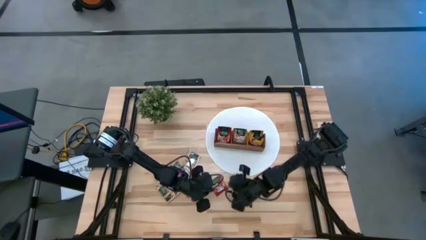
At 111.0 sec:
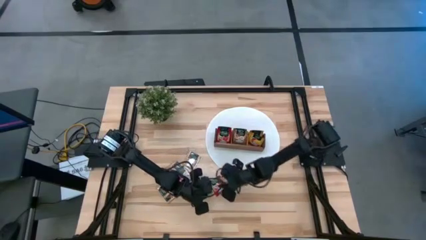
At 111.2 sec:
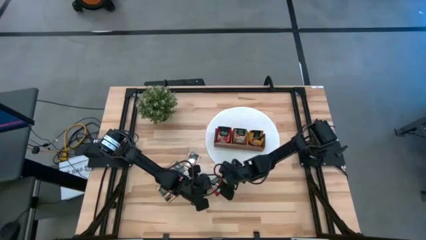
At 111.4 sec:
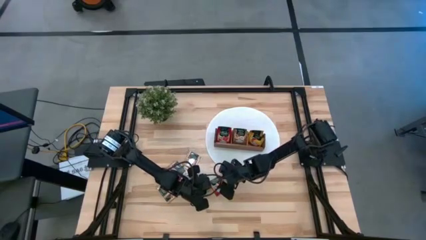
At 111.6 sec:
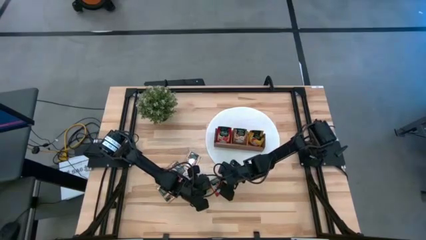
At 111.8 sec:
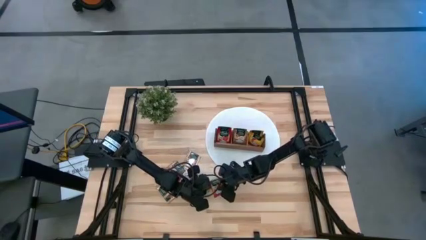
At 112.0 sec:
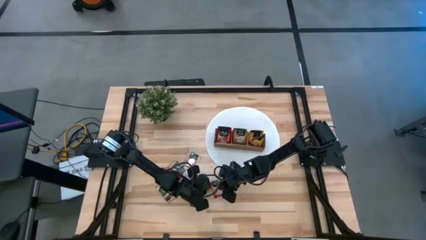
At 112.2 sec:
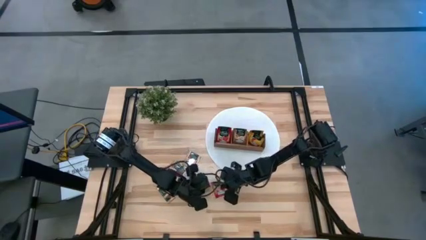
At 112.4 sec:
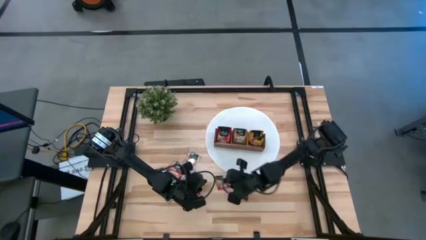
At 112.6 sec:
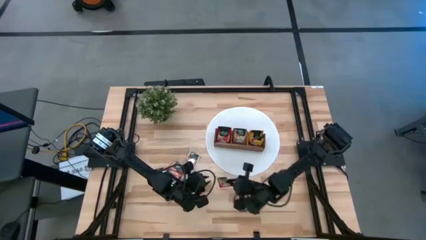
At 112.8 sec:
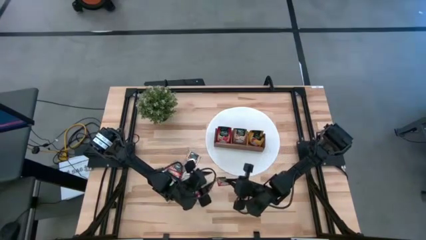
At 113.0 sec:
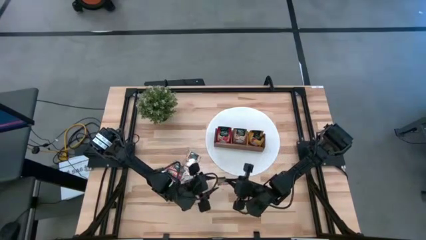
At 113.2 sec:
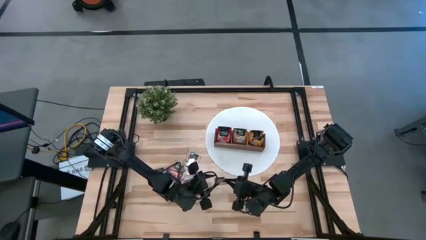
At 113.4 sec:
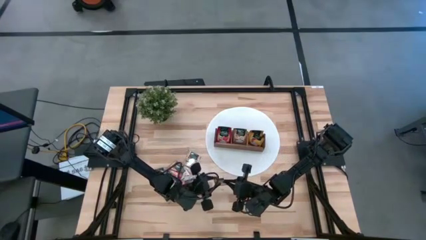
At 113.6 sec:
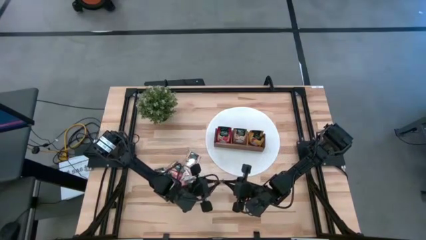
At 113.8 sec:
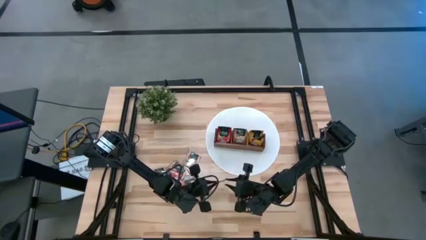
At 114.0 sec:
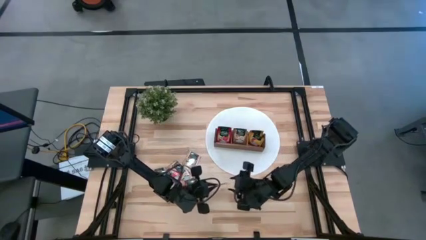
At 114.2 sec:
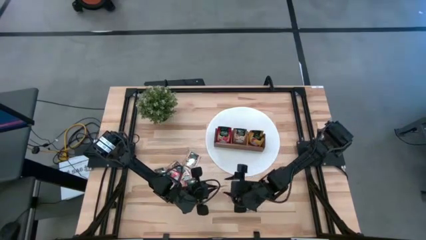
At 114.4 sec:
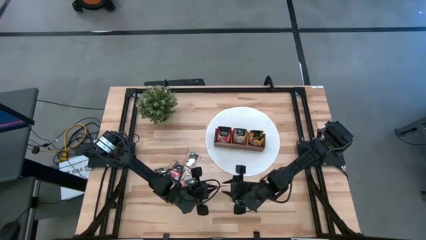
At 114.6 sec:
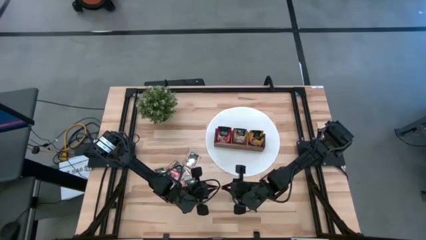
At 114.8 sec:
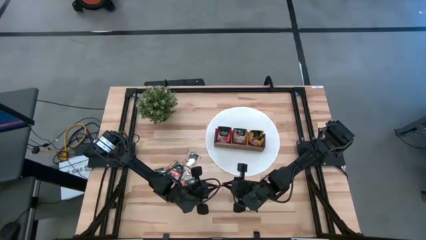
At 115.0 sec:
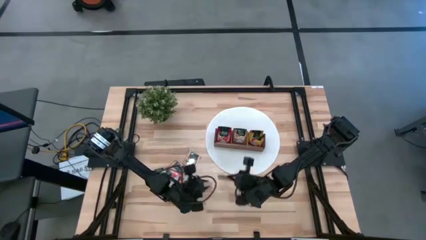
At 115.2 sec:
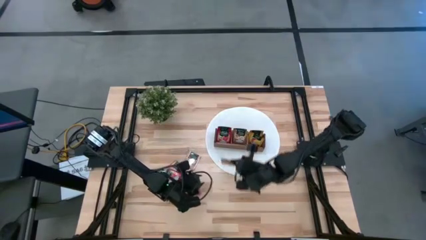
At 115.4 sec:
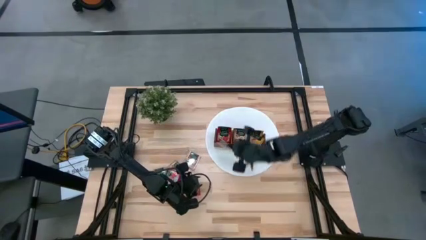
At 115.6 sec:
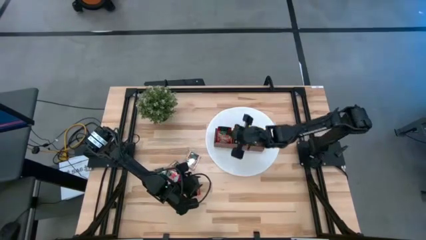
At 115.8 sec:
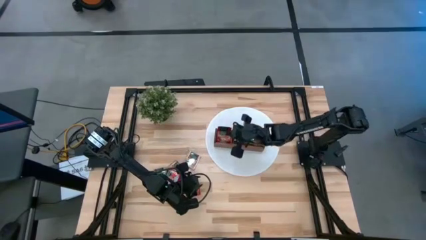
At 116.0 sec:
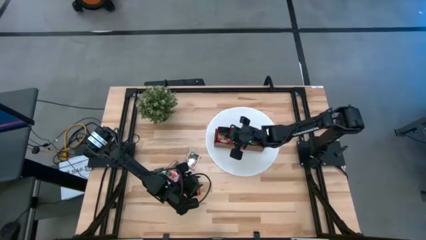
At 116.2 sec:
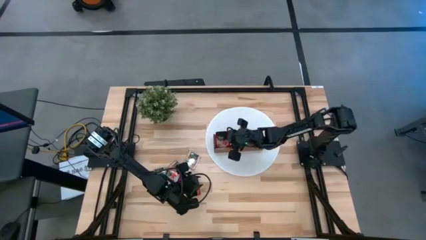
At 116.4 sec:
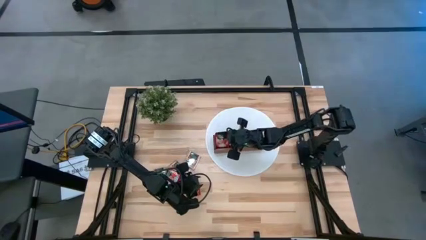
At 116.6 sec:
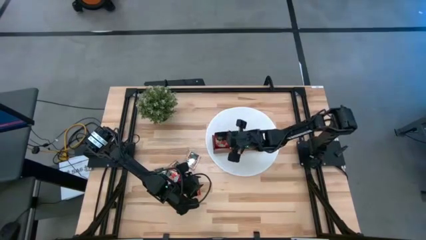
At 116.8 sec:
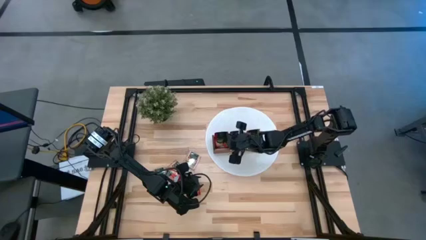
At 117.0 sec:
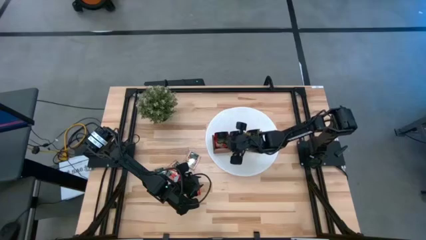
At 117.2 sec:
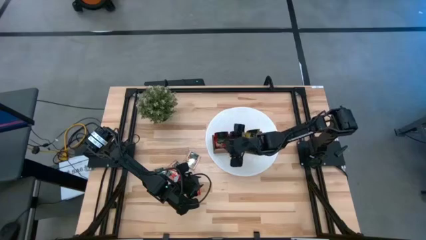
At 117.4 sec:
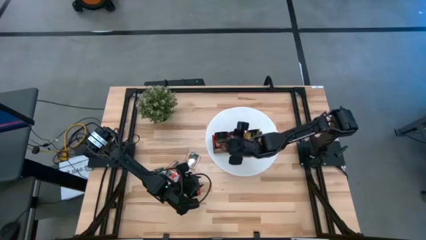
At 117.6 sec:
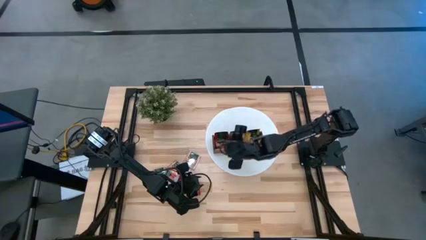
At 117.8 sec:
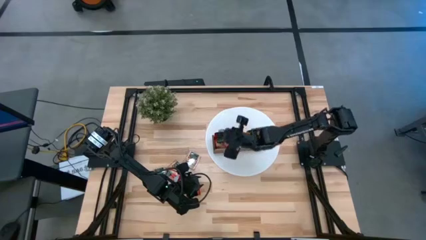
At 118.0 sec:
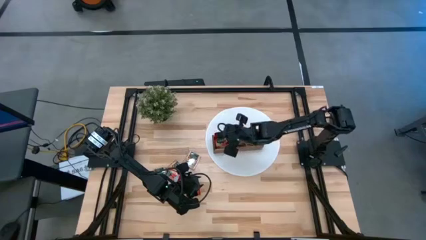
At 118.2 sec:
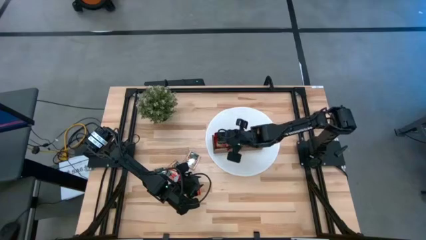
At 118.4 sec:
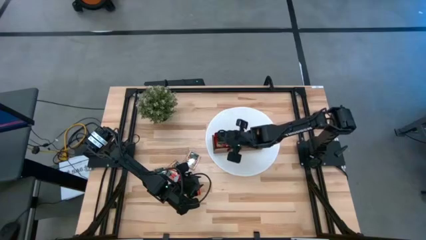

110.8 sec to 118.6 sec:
Task: Pick & Place Tea
Put the red tea bag into the left section of the wooden organizer

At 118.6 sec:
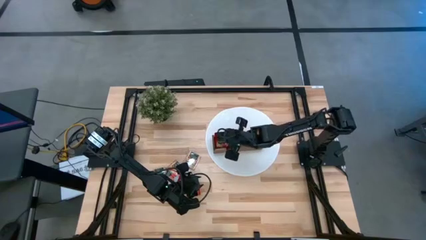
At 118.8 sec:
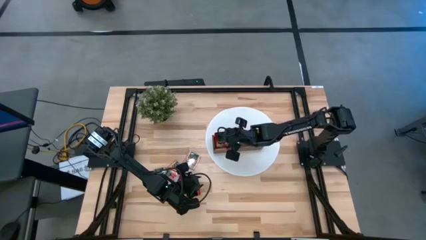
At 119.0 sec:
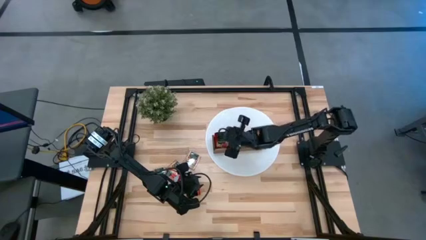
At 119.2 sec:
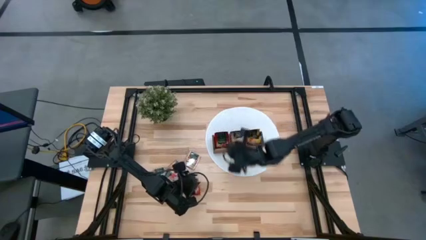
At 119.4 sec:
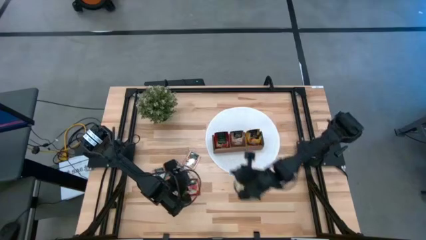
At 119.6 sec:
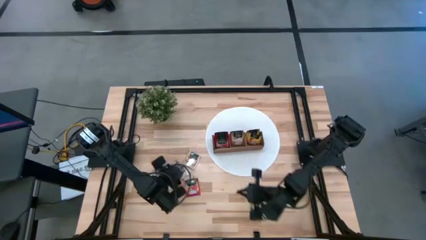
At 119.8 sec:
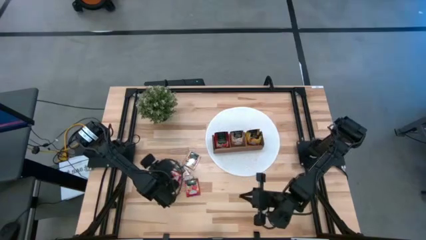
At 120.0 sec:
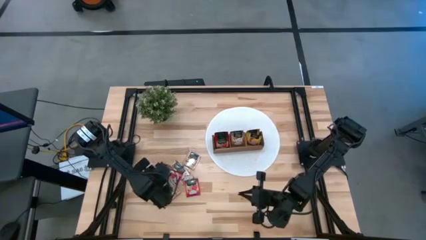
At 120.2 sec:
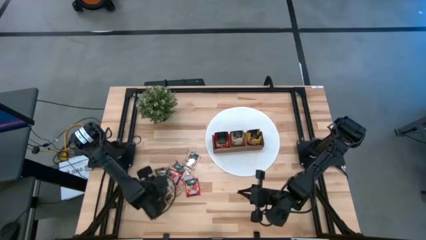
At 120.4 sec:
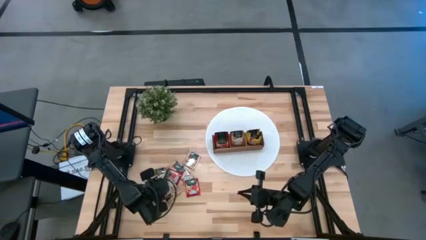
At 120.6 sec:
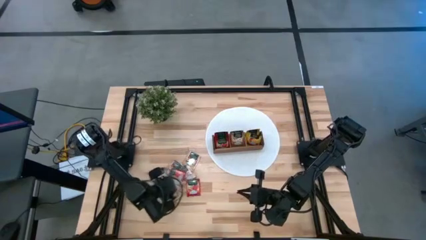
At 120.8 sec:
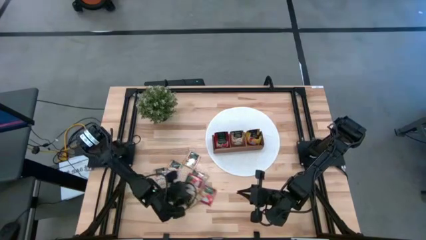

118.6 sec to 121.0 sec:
Adjust the brown tea bags

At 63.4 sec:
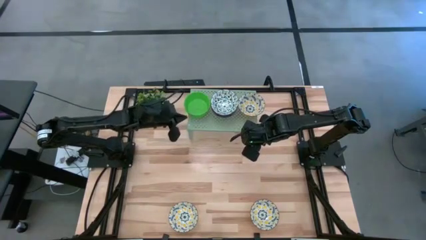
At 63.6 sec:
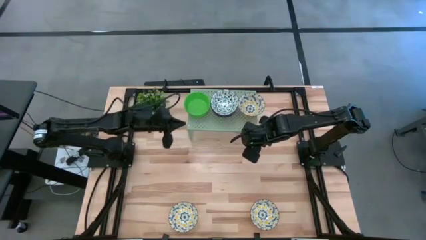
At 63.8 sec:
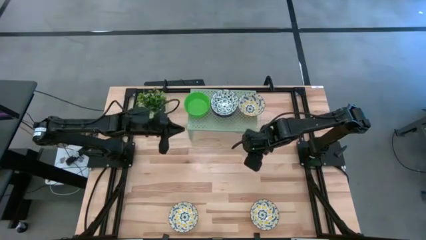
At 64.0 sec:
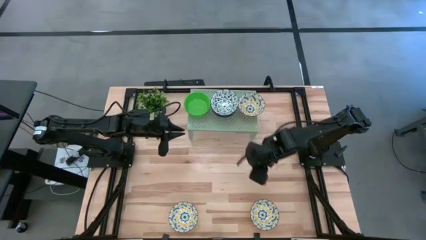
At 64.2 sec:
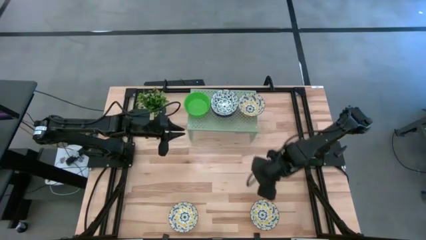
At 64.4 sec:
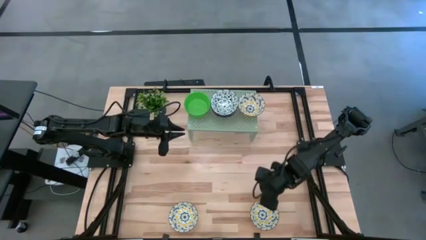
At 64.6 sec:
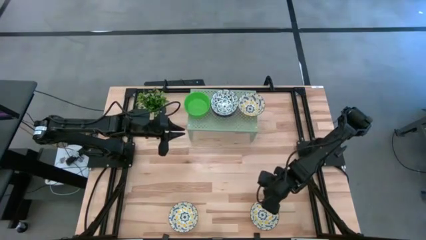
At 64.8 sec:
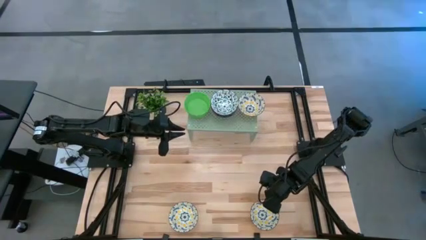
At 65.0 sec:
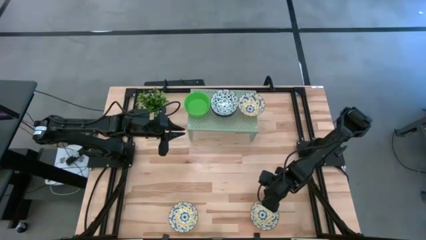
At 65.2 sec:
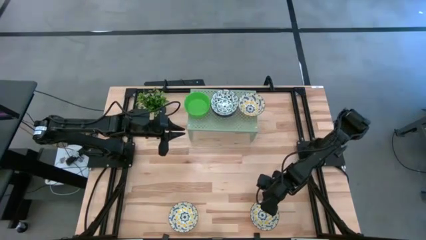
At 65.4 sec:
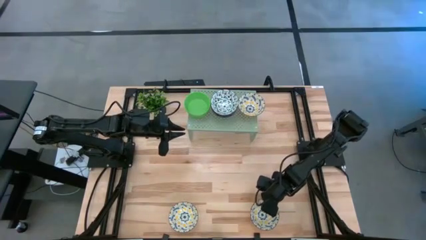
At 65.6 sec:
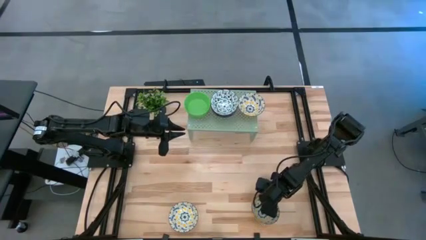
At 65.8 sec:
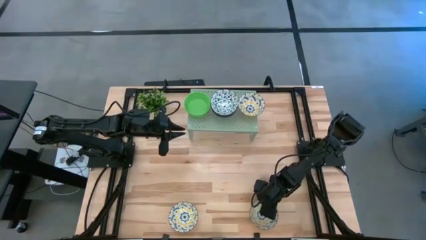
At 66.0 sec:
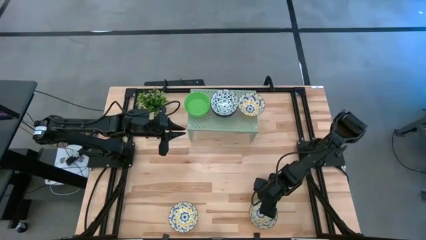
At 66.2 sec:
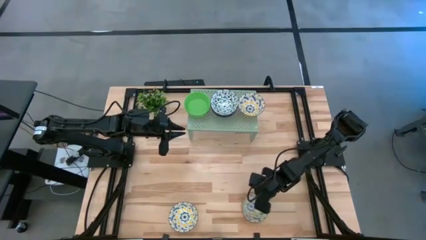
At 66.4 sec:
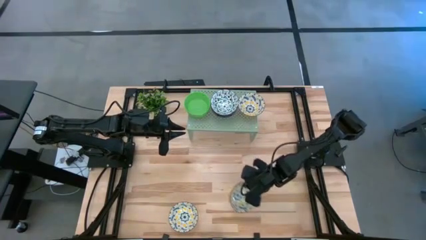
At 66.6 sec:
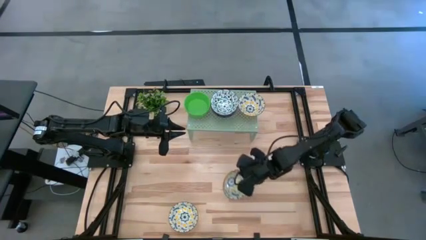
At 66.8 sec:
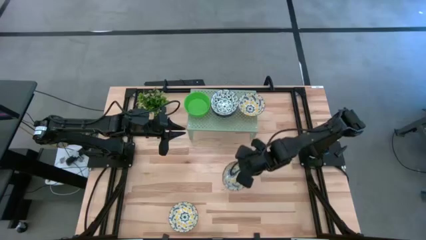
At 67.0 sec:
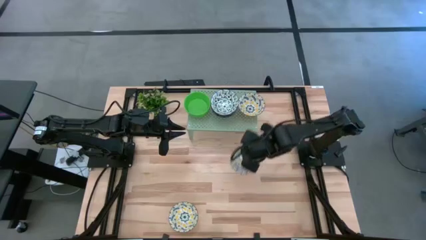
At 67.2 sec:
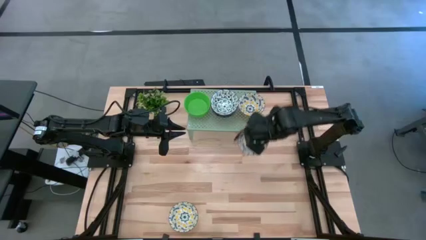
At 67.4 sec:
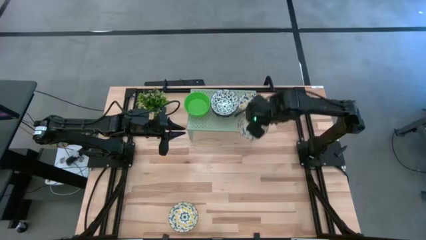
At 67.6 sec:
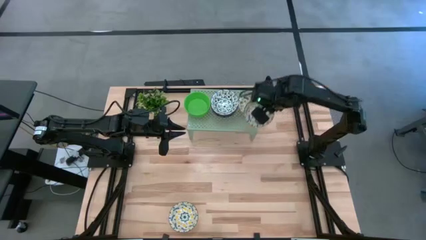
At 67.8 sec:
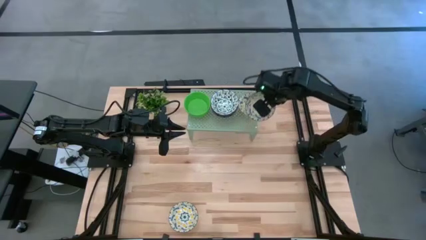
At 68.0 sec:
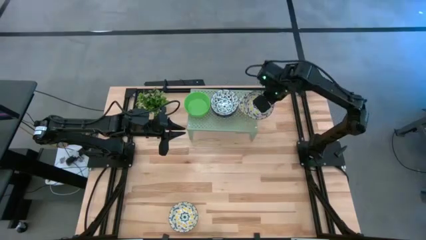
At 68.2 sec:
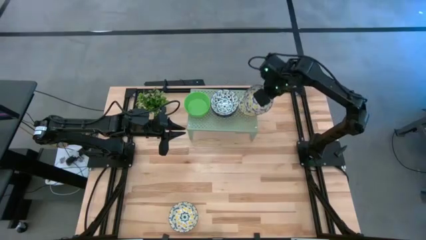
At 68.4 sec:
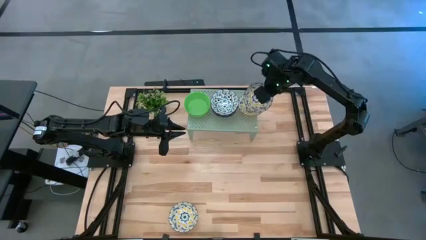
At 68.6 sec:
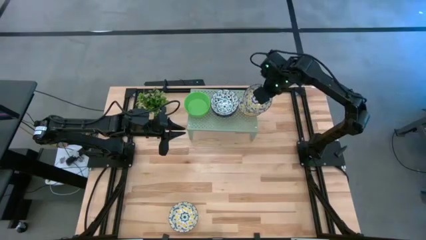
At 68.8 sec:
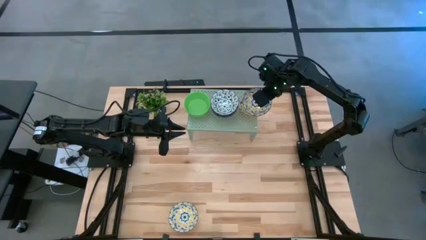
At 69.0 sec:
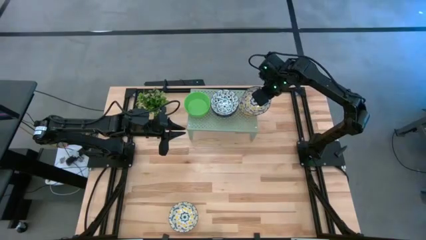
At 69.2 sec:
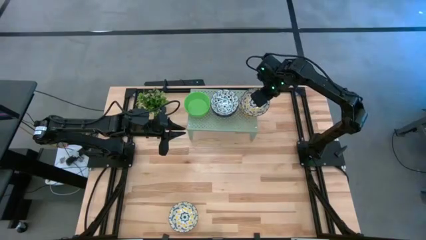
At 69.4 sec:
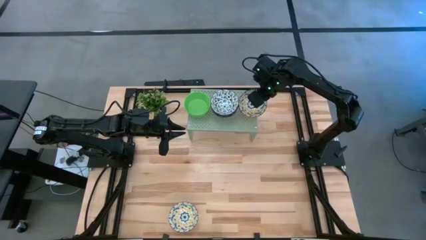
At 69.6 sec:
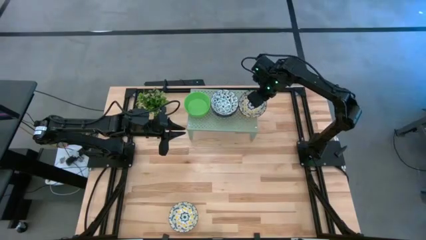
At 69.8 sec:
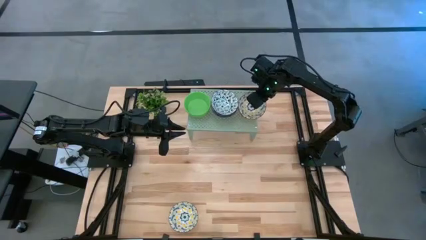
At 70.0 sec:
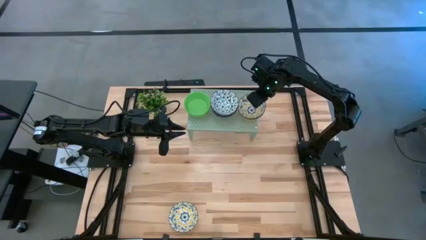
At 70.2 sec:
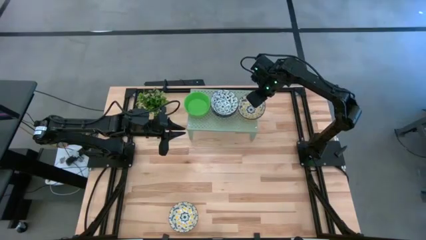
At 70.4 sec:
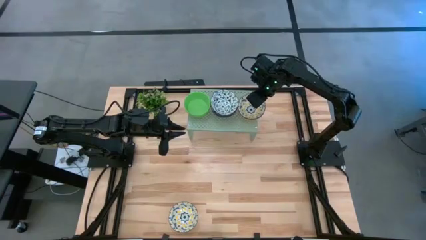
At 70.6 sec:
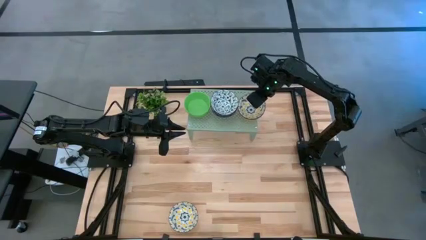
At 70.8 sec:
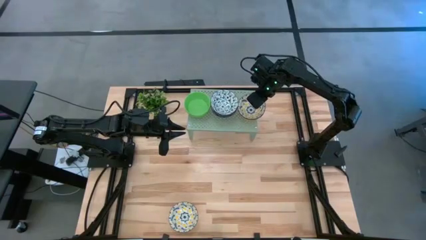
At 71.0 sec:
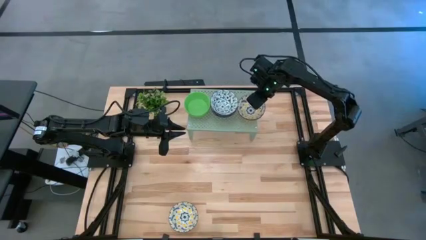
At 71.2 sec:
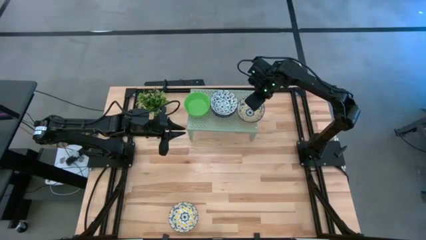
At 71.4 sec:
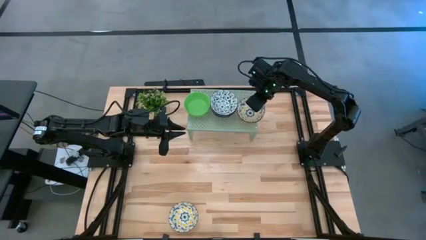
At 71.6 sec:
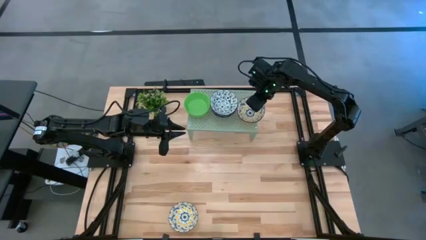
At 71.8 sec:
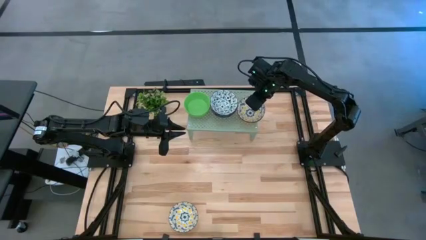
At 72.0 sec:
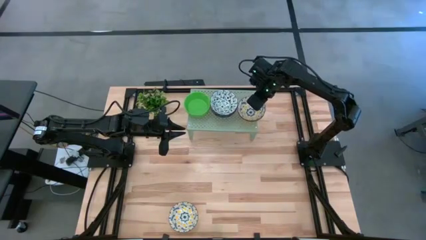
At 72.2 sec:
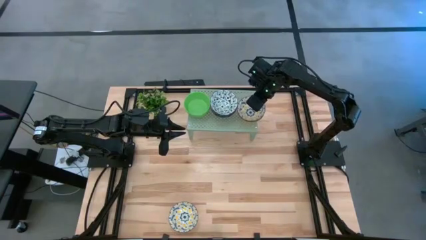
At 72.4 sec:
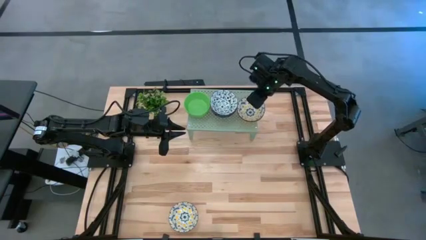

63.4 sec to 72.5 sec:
Task: Pick & Place Mini bowls
Stack the right yellow bowl on top of the yellow bowl on the shelf
